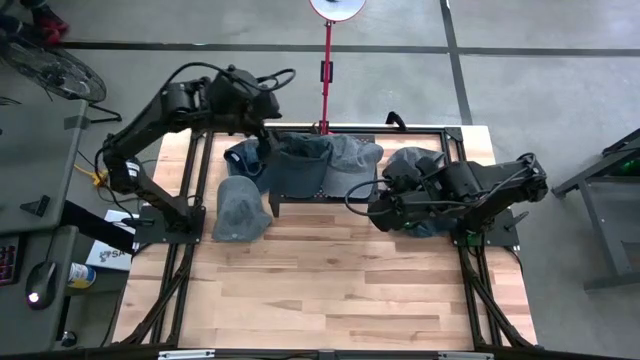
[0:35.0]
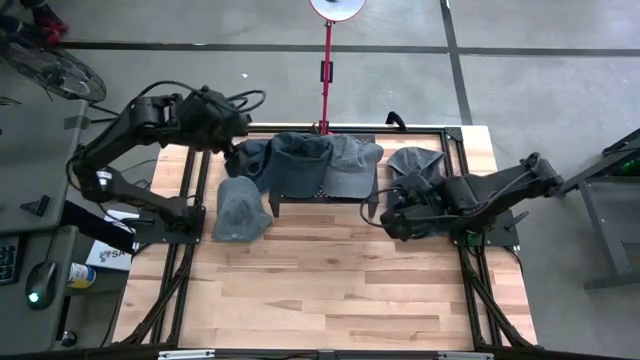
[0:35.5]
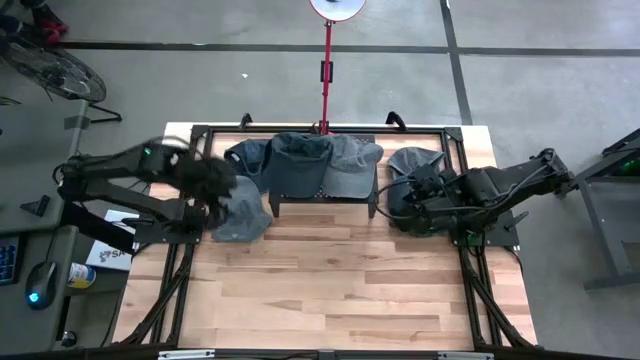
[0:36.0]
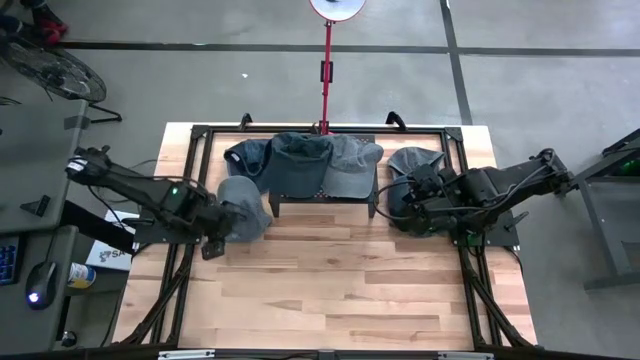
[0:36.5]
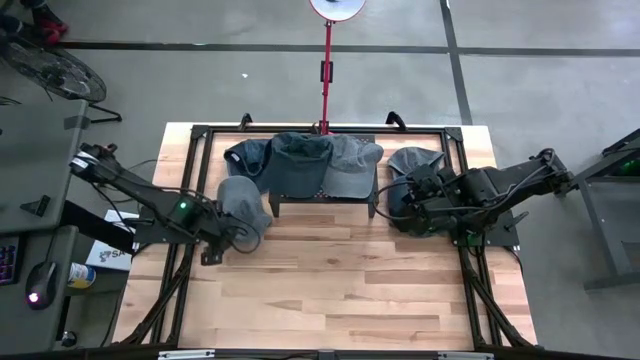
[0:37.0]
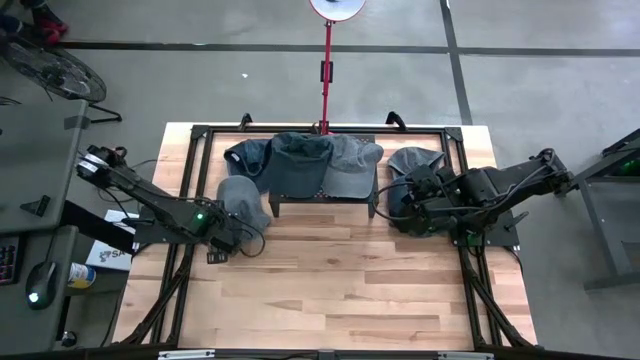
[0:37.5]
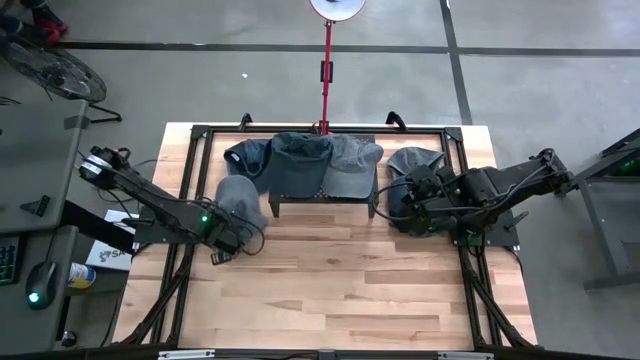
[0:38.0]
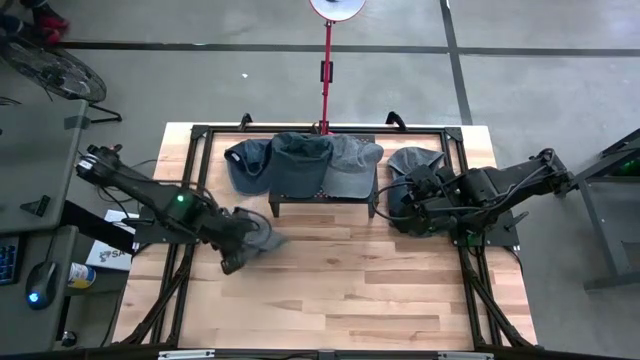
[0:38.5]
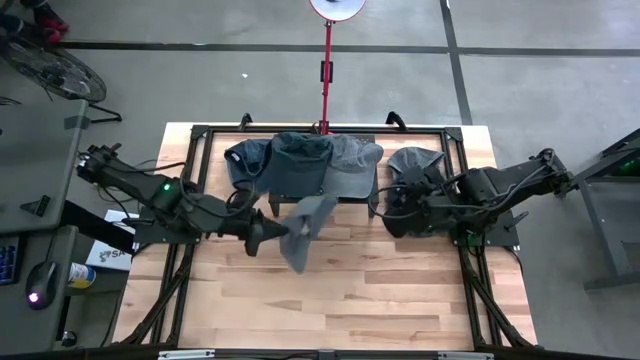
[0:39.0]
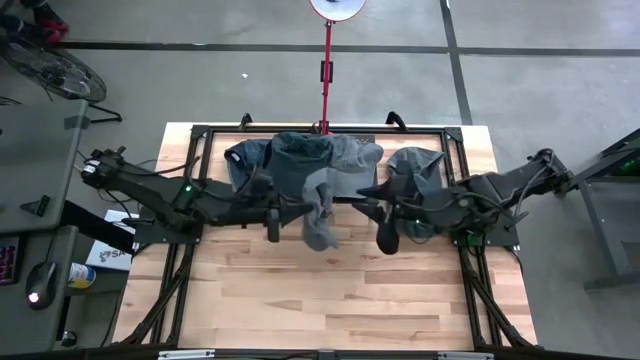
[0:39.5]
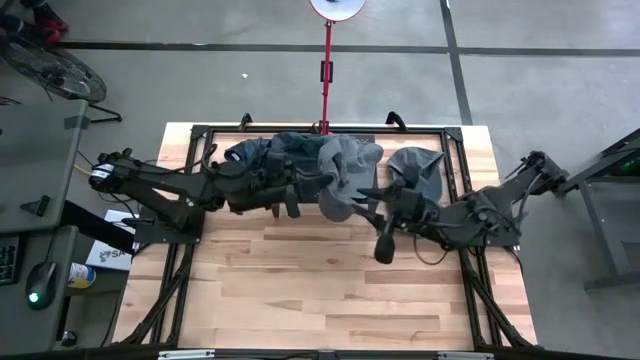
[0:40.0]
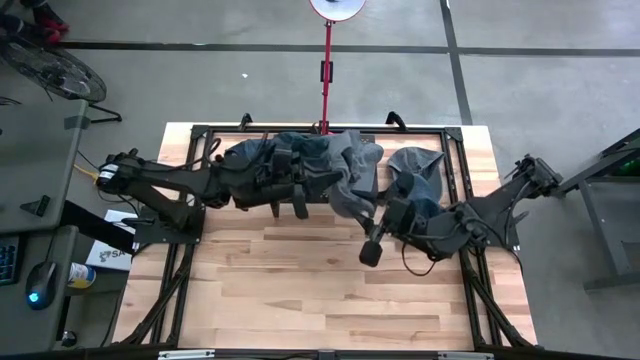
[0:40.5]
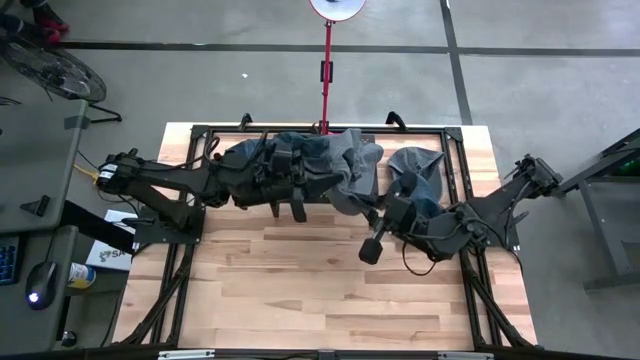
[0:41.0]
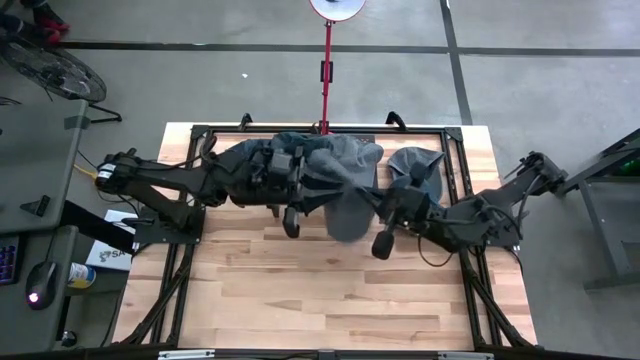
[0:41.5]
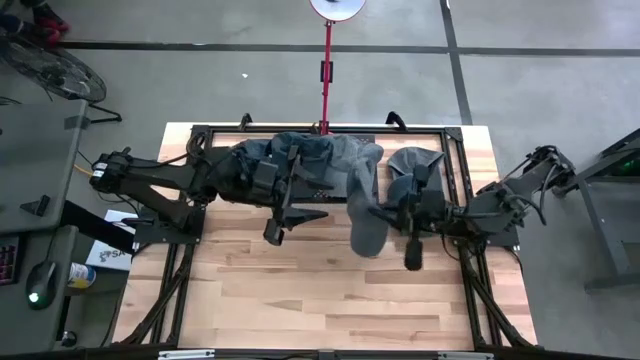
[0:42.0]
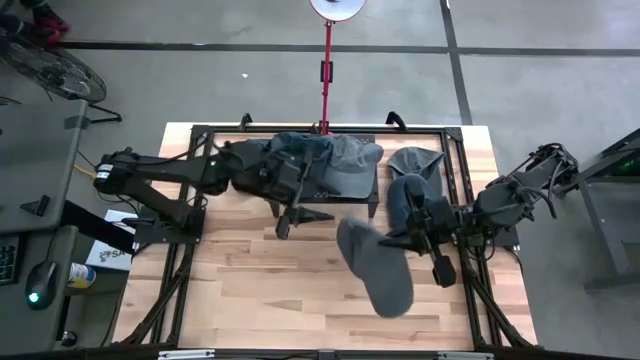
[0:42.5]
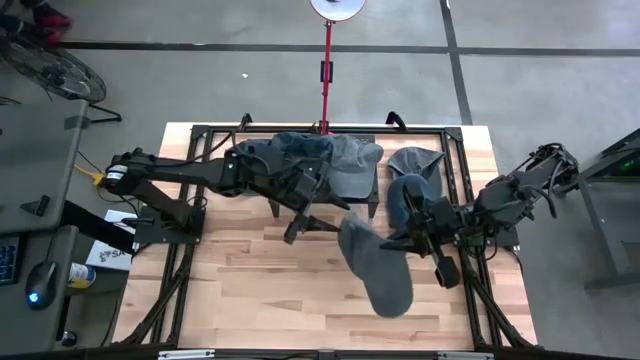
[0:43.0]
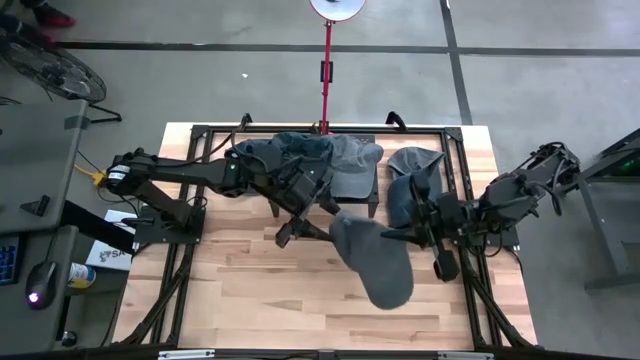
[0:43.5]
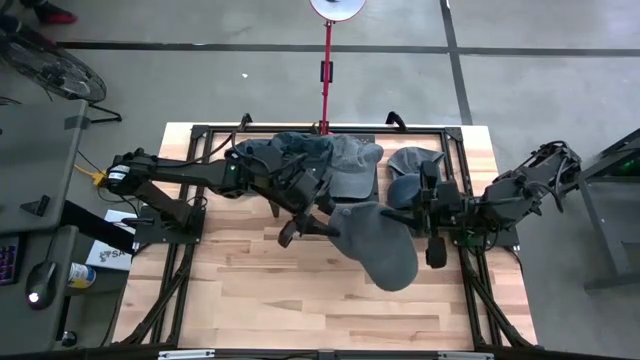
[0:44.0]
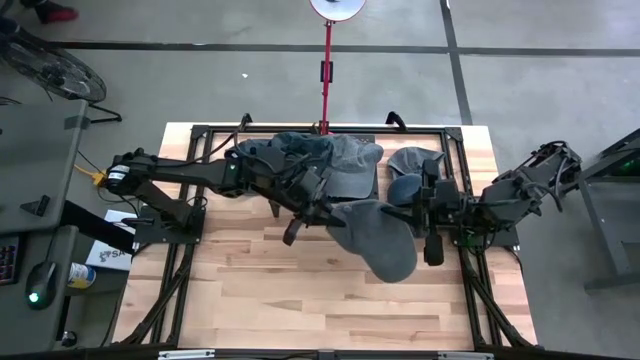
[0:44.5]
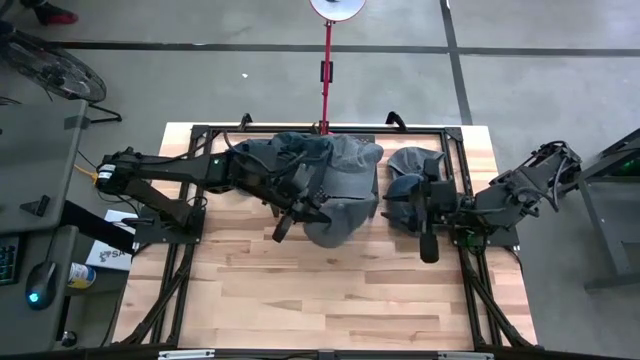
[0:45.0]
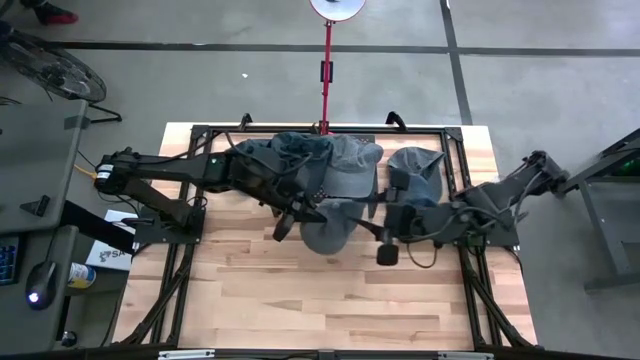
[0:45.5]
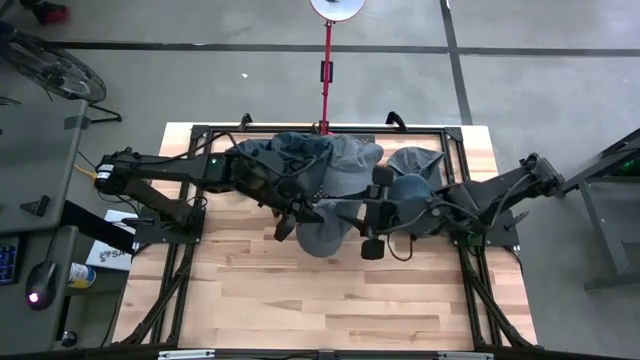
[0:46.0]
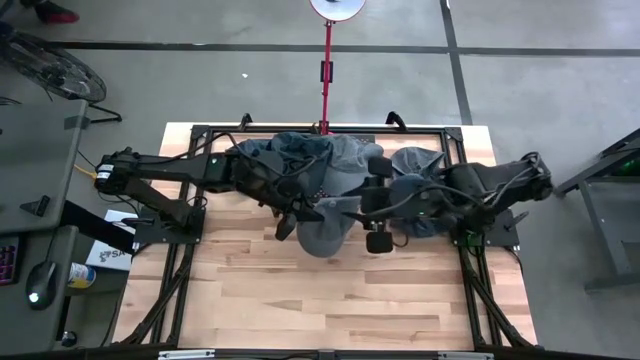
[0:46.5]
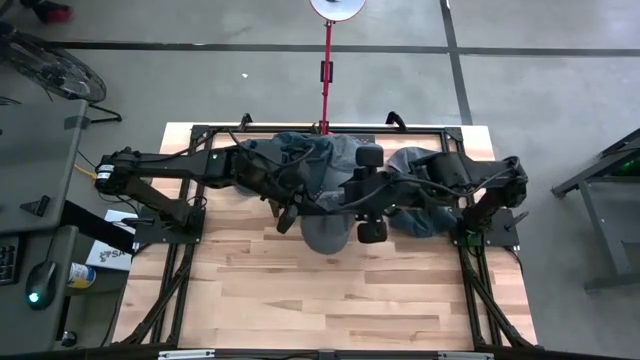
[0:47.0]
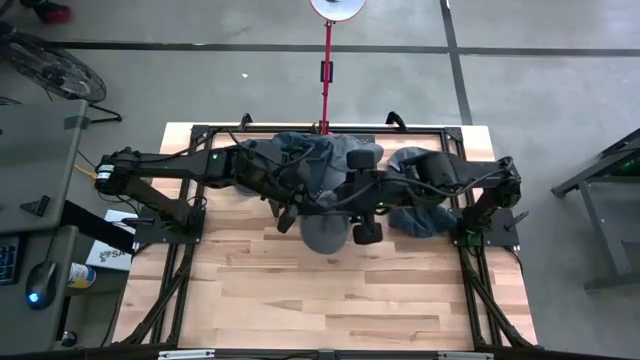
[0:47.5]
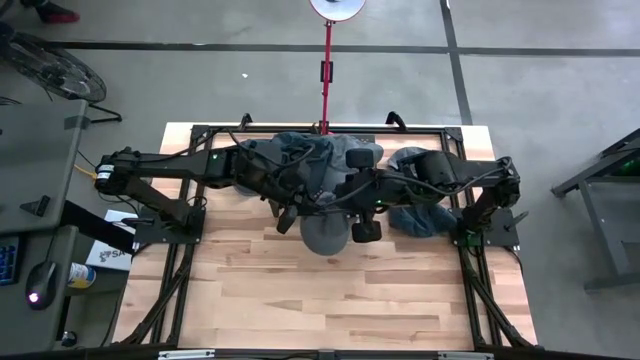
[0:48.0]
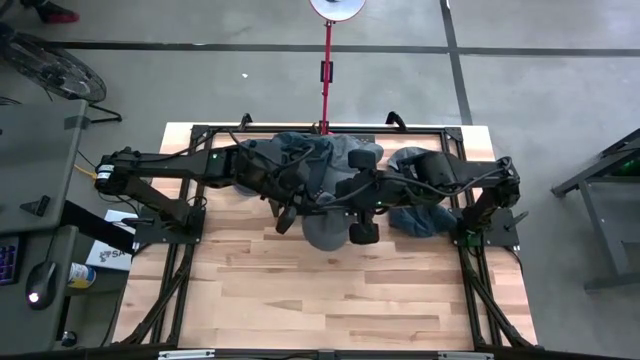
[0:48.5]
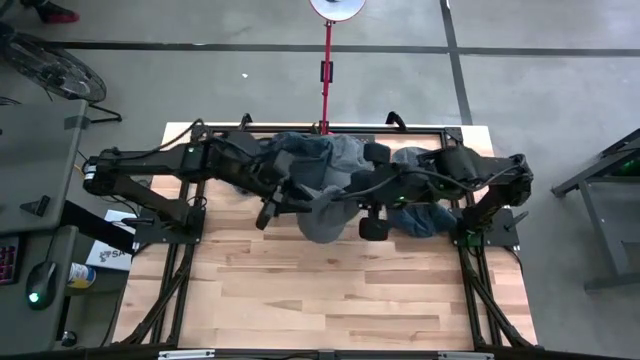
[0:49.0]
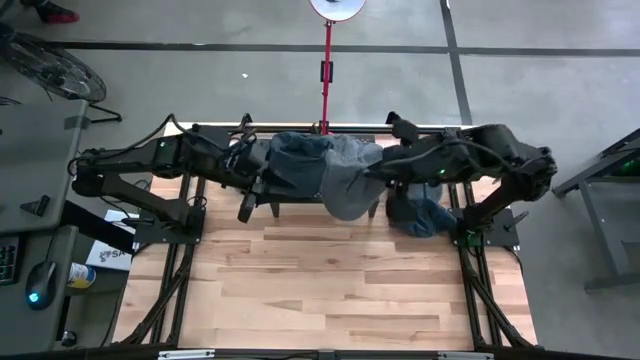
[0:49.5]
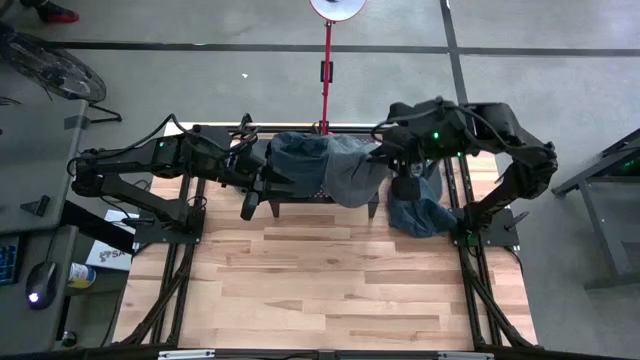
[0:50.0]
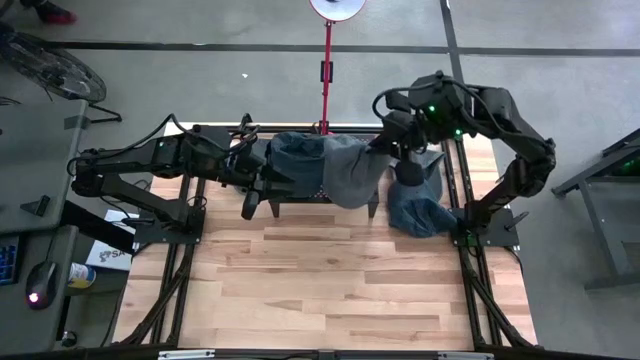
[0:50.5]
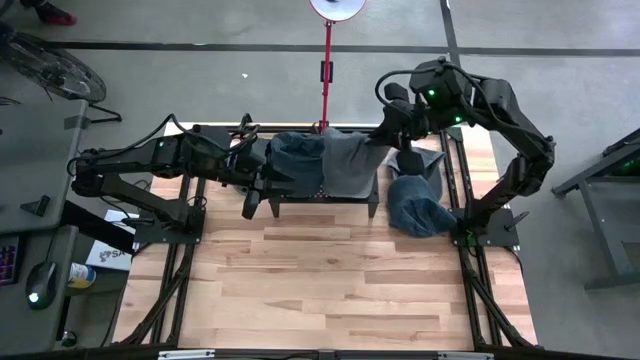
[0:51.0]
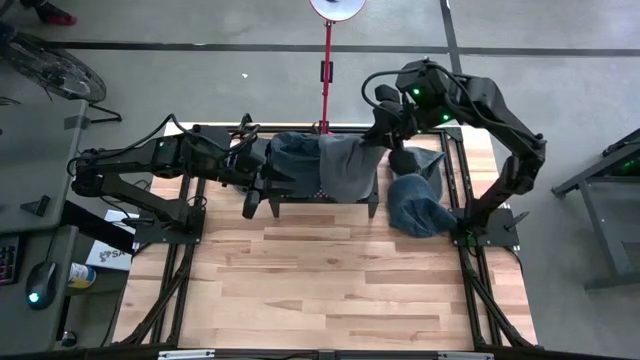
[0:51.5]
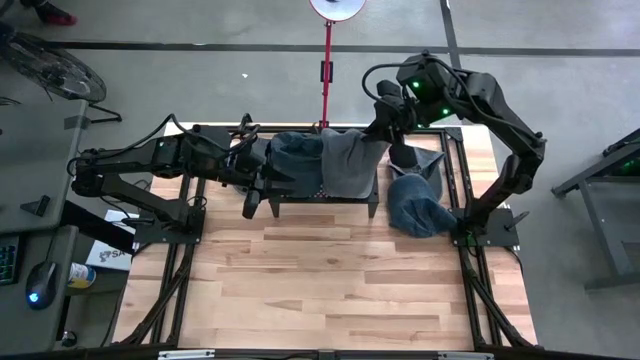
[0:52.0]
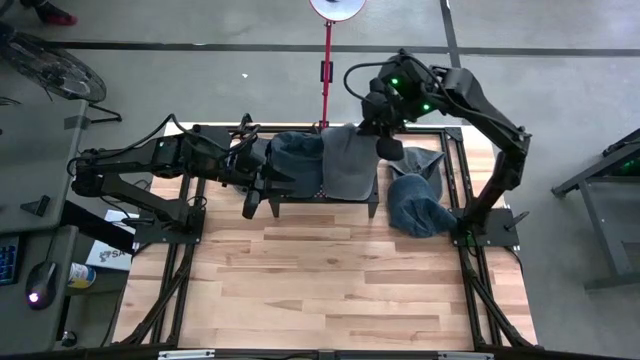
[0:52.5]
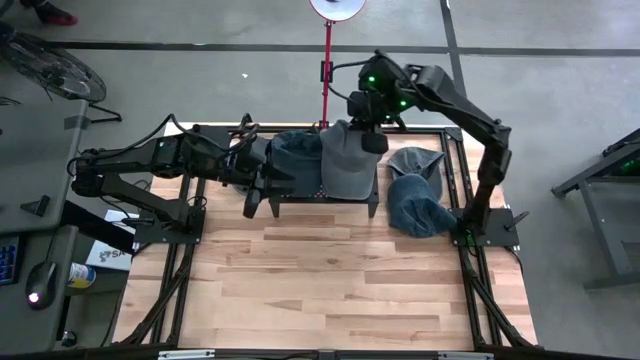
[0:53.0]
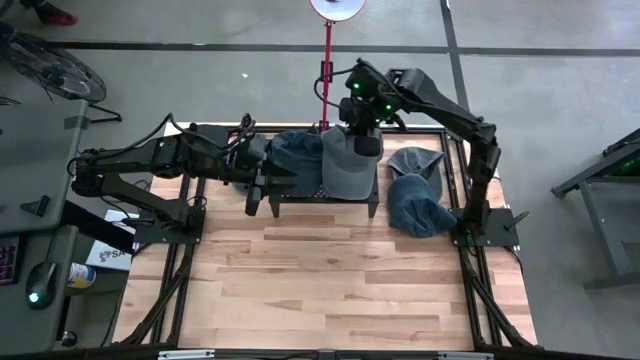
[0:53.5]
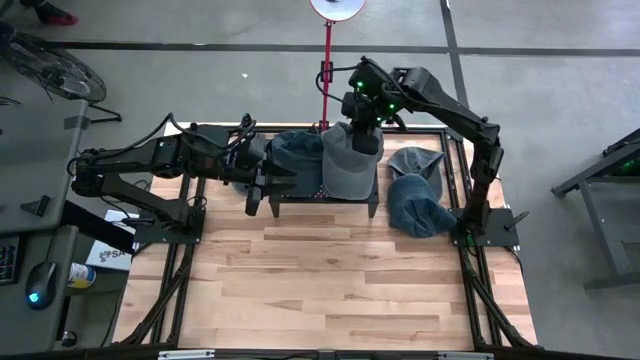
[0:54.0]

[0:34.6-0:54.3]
Task: Pick & Place hat
Stack the left gray cap on the gray cap
